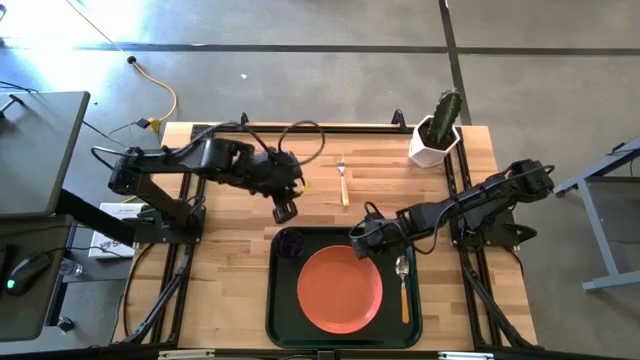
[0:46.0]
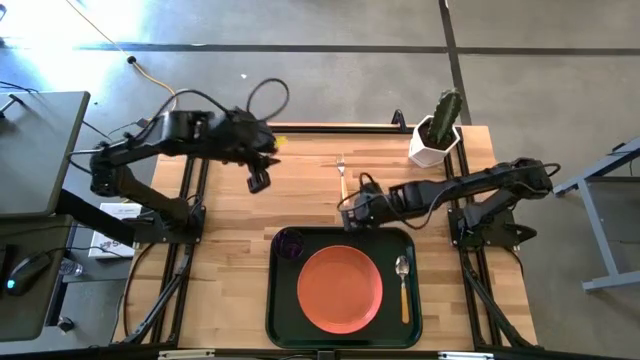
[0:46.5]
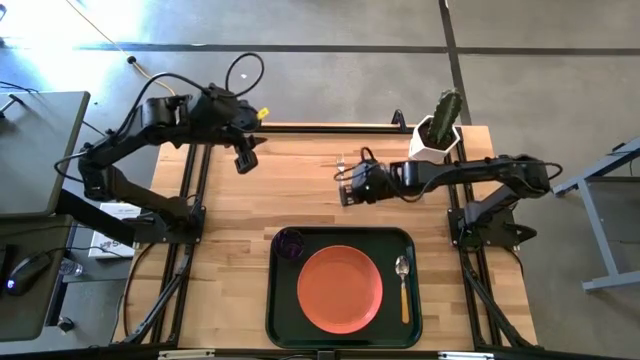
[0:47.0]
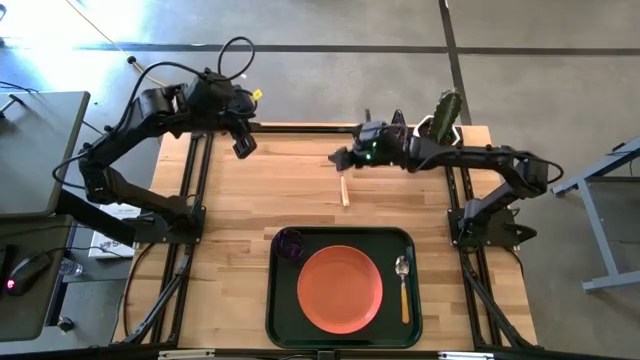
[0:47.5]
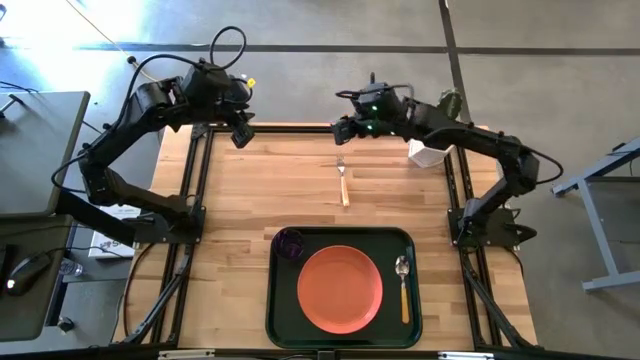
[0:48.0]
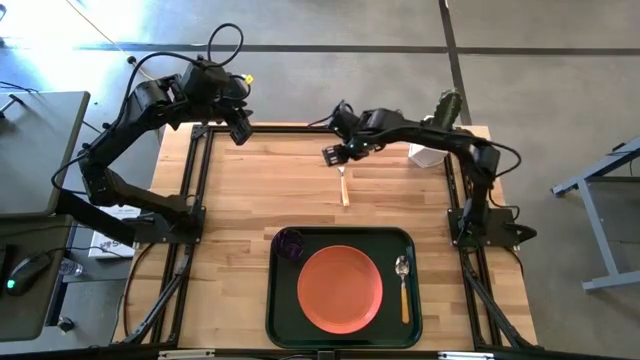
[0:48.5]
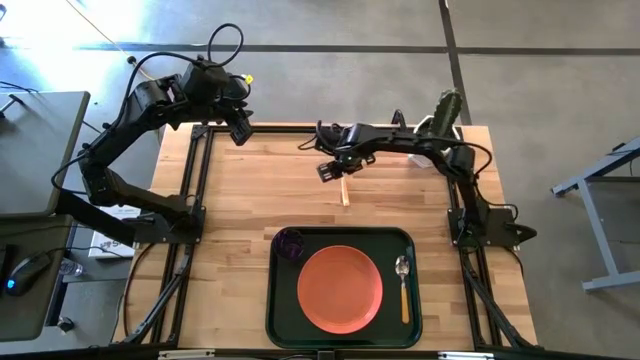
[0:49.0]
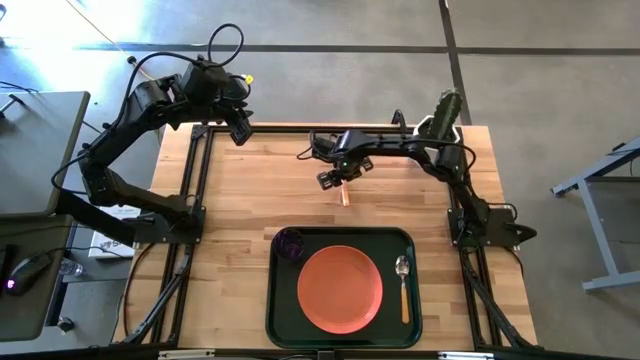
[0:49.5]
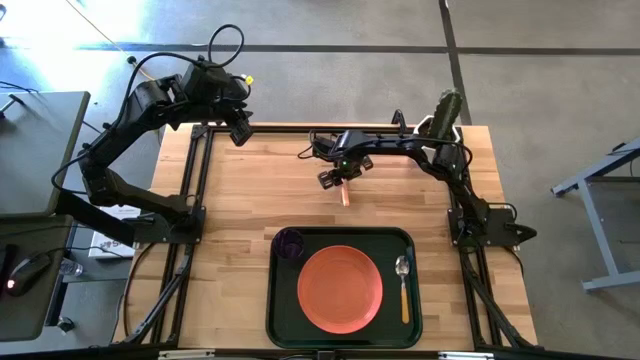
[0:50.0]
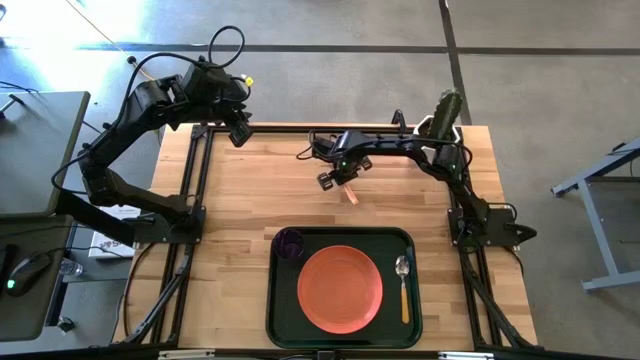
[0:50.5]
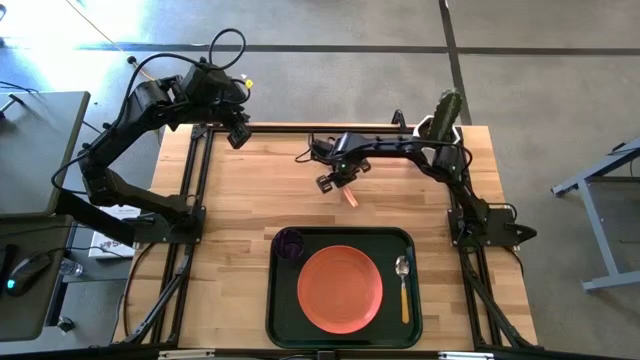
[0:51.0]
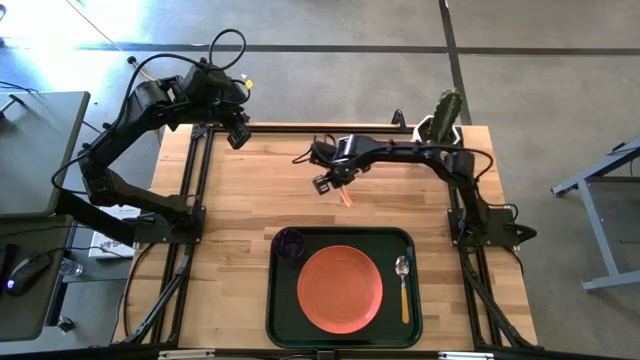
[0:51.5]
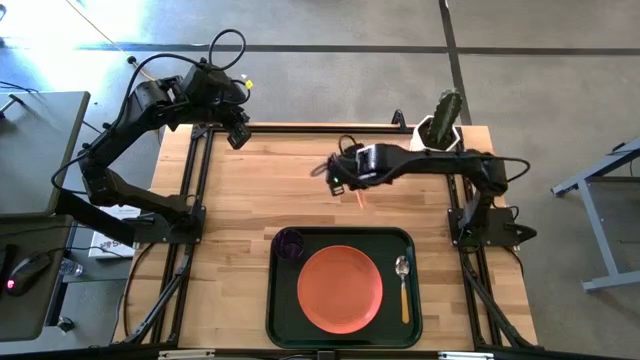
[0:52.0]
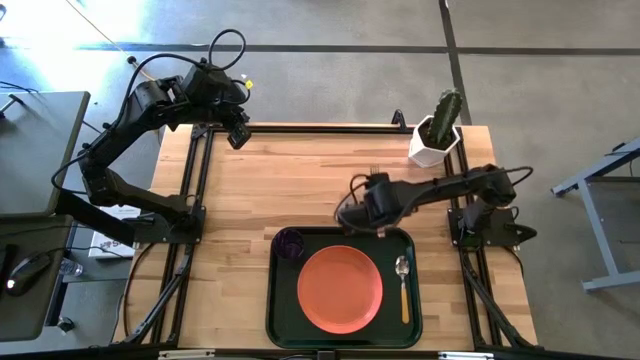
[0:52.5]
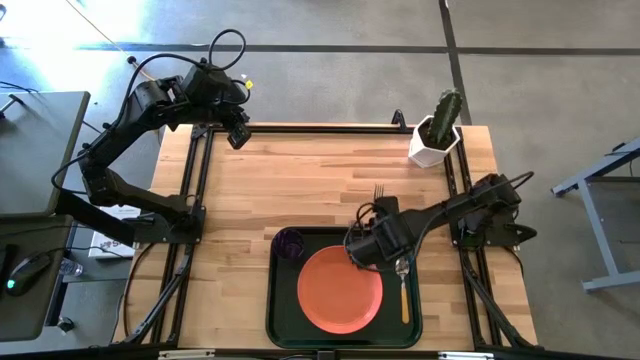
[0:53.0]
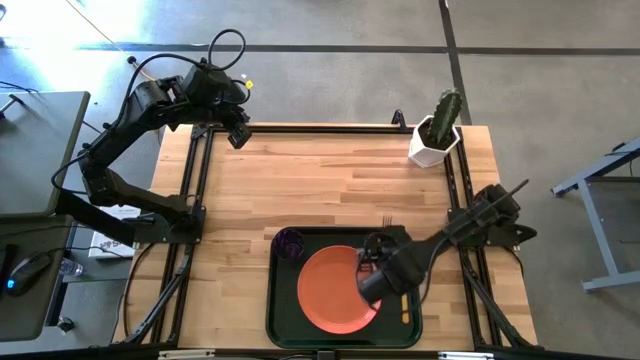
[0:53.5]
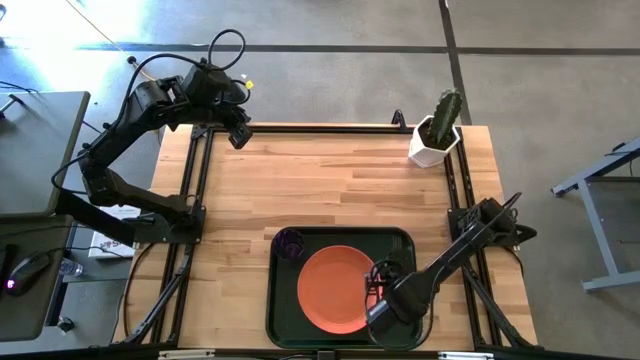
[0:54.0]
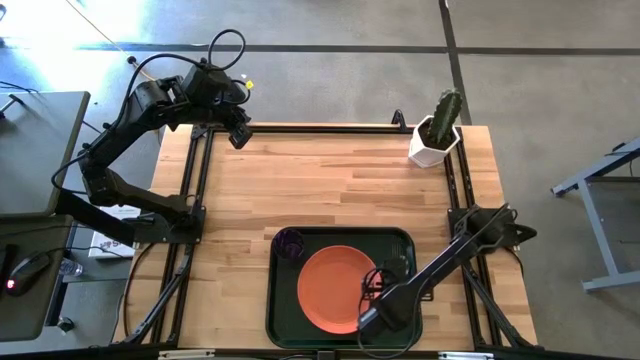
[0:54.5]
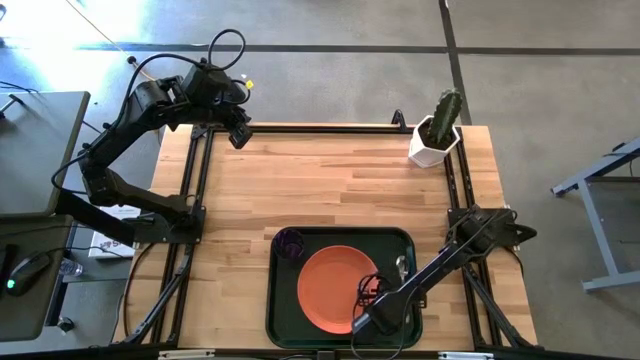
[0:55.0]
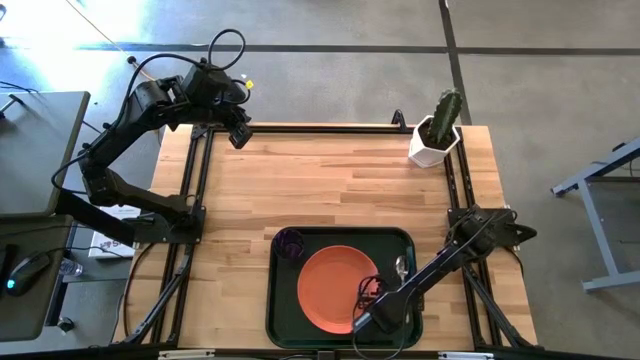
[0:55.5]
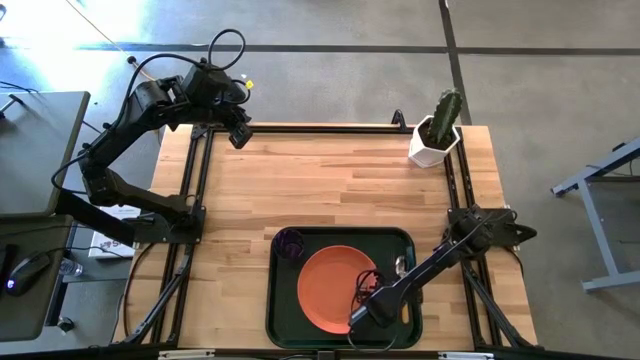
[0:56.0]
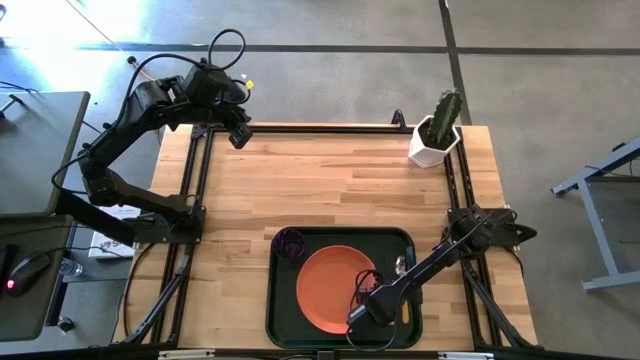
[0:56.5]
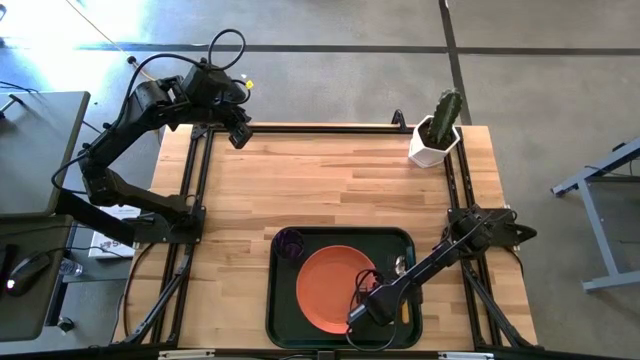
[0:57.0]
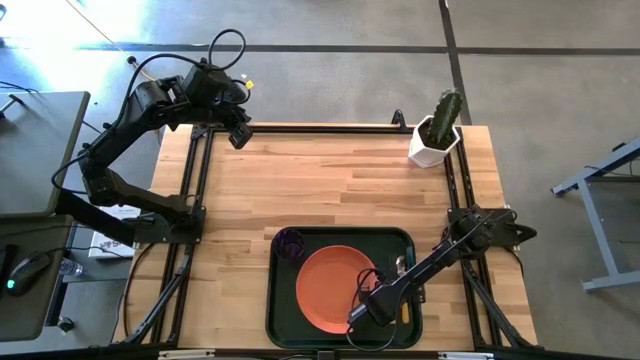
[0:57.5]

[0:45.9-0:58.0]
Task: Pick and place plate/cup/fork/spoon on tray
Put the orange fork on the dark green tray

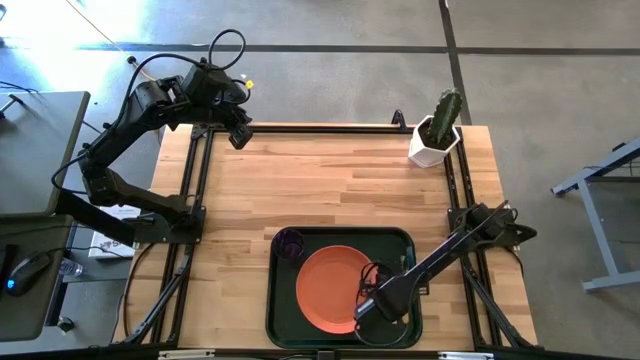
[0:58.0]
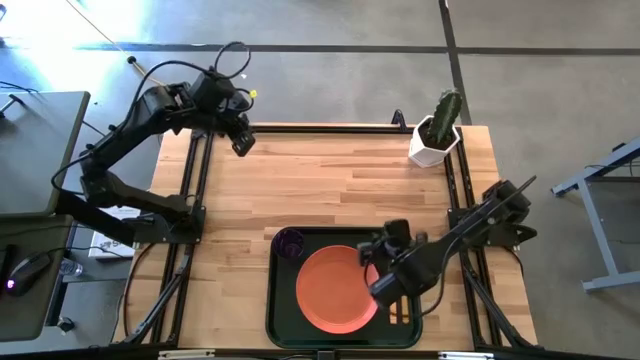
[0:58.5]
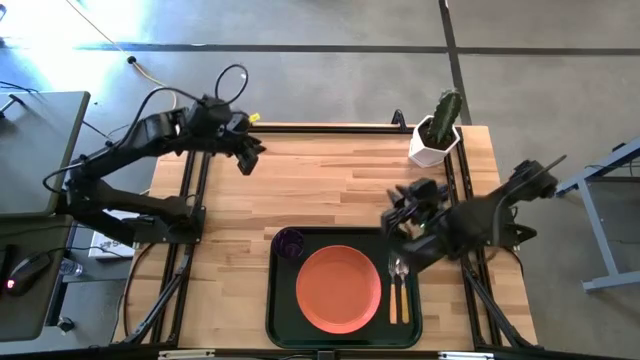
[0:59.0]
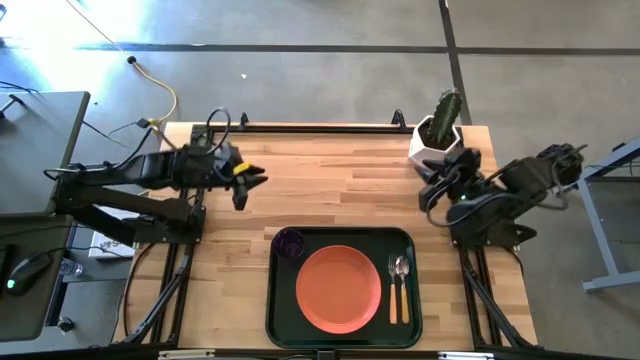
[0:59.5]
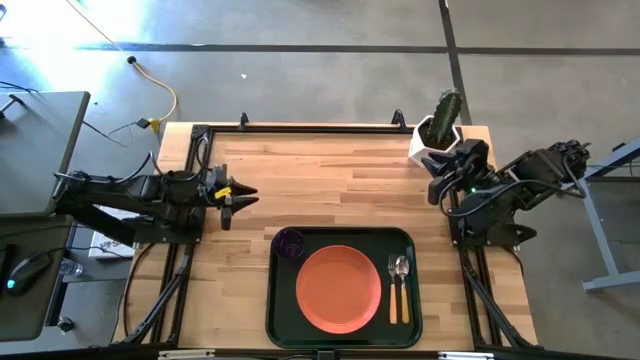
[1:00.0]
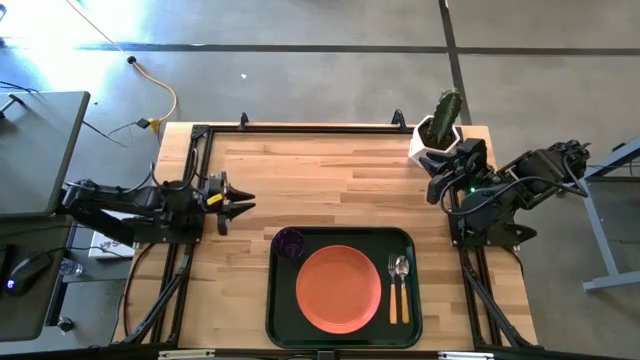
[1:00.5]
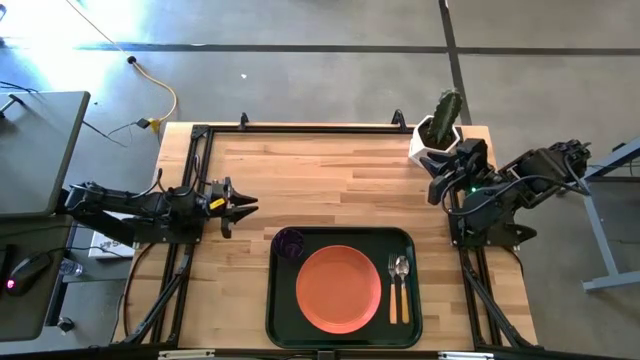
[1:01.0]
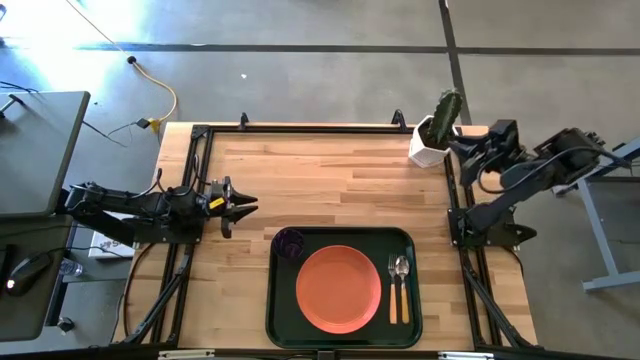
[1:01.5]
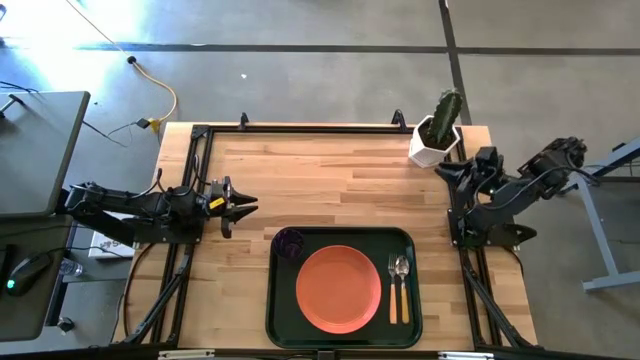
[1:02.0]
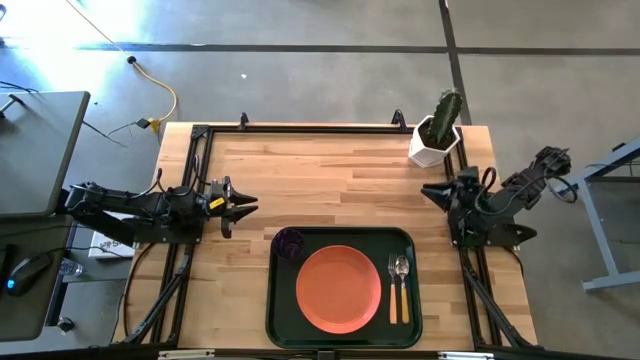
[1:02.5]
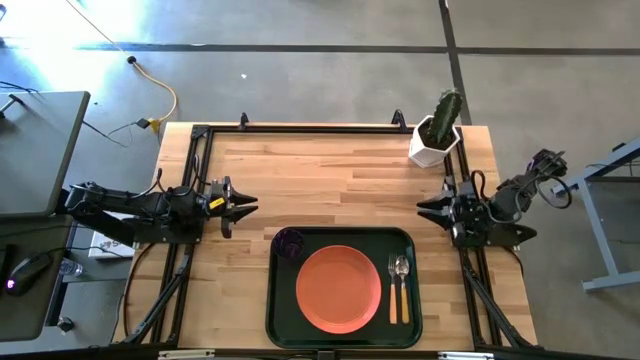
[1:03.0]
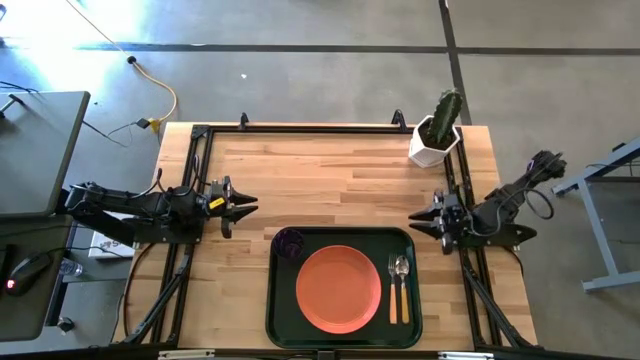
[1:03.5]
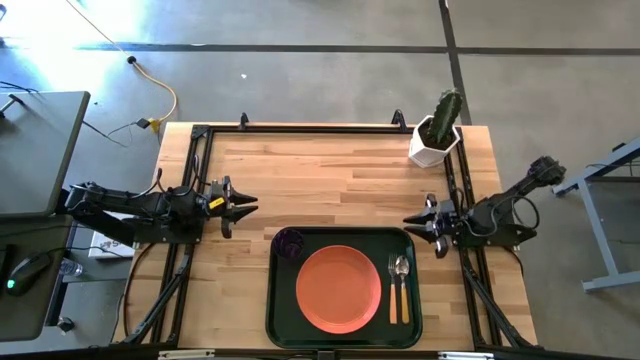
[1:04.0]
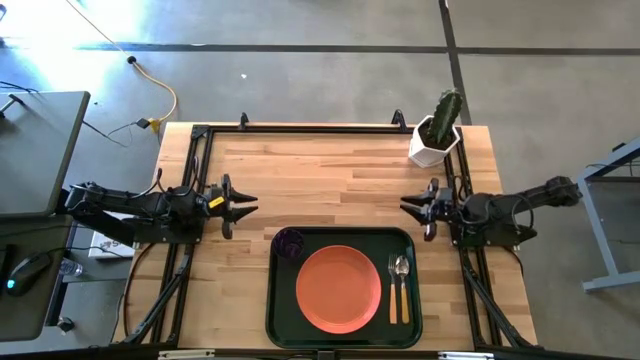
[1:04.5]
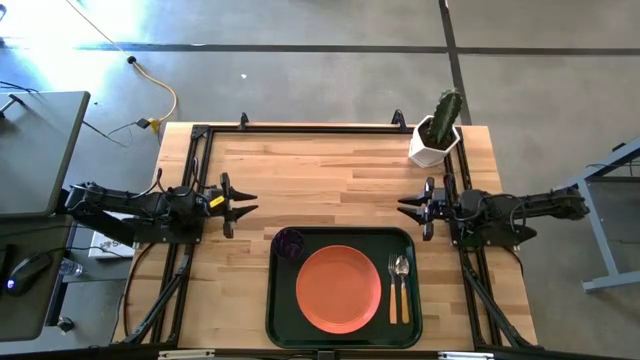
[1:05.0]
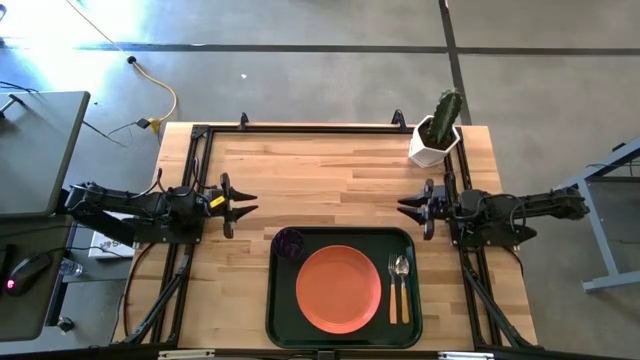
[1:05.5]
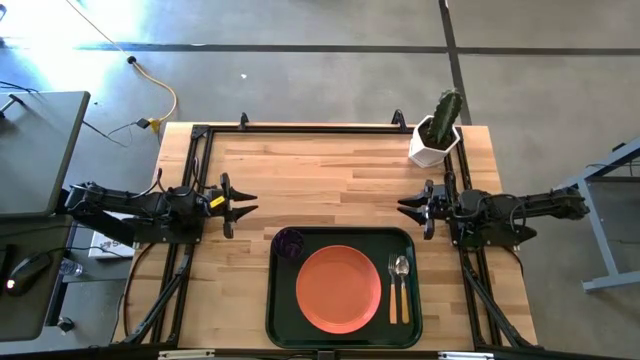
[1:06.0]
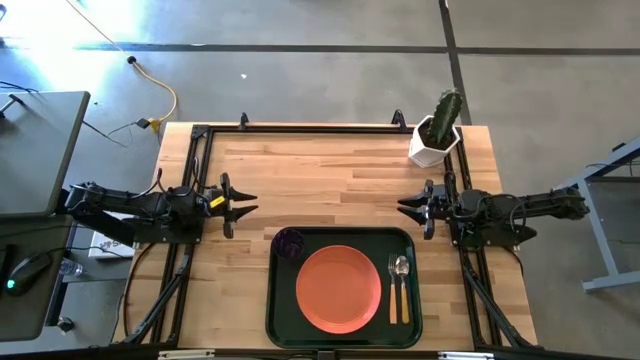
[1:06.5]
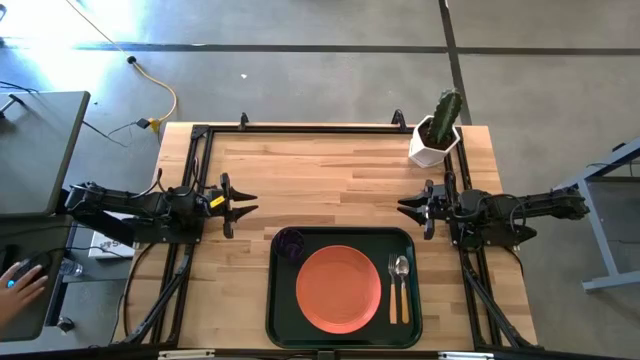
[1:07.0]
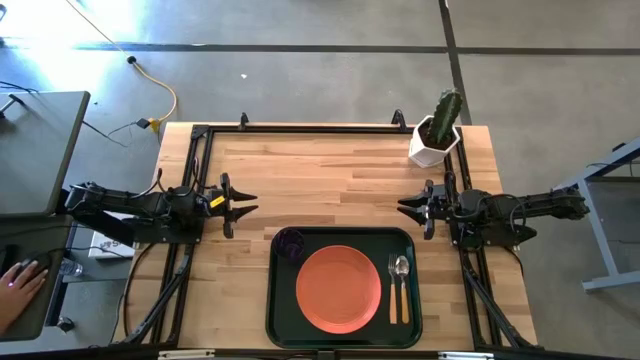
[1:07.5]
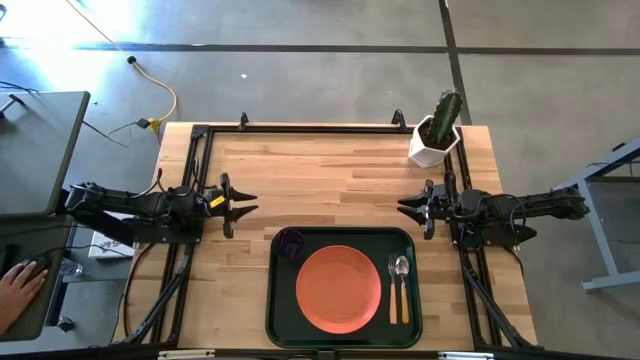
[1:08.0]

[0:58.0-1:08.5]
Return to Home Position
